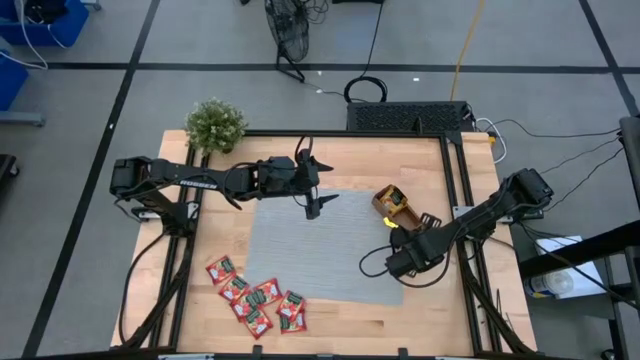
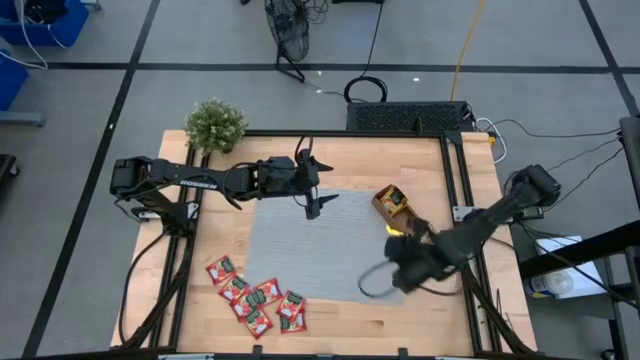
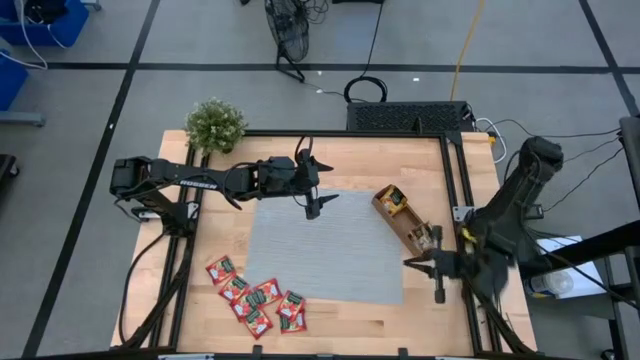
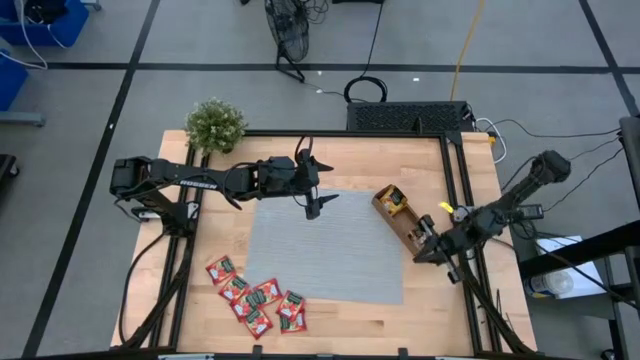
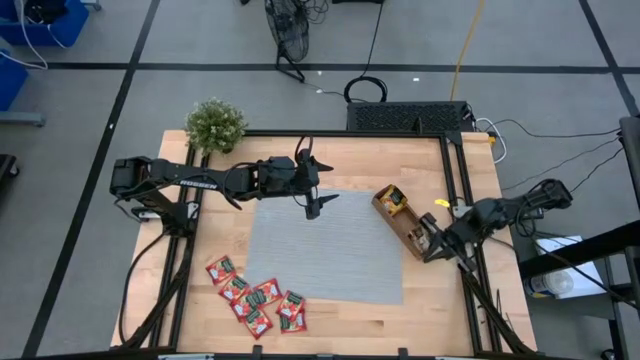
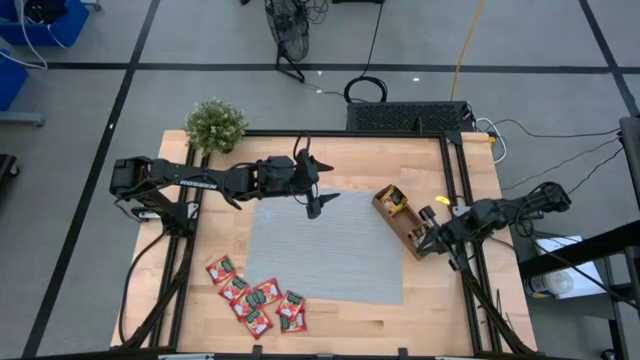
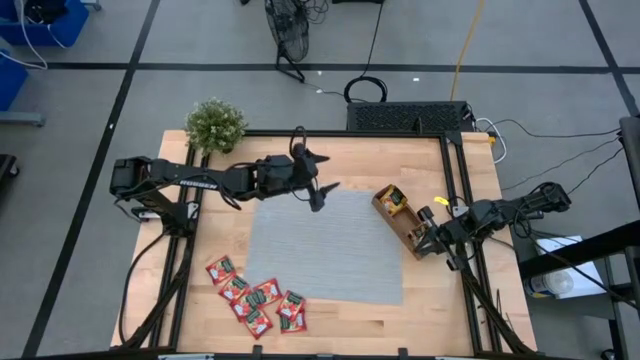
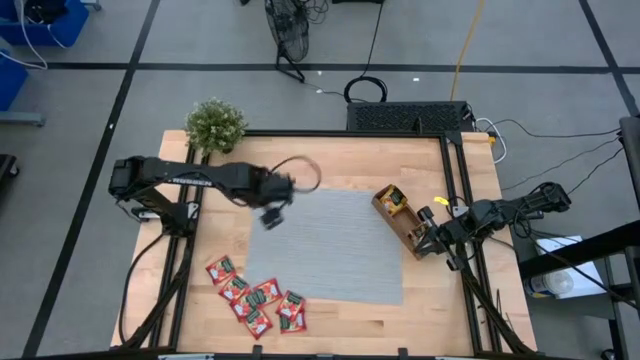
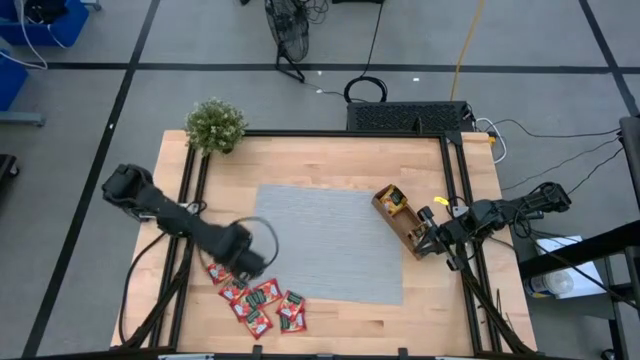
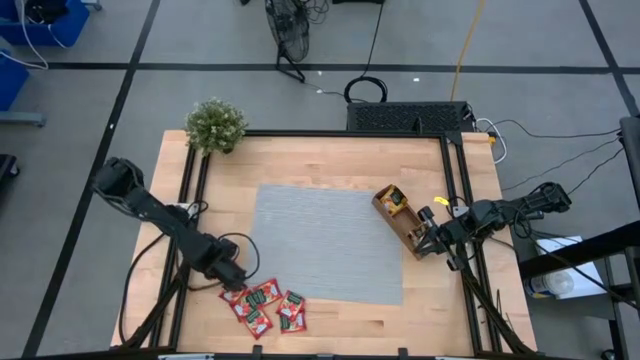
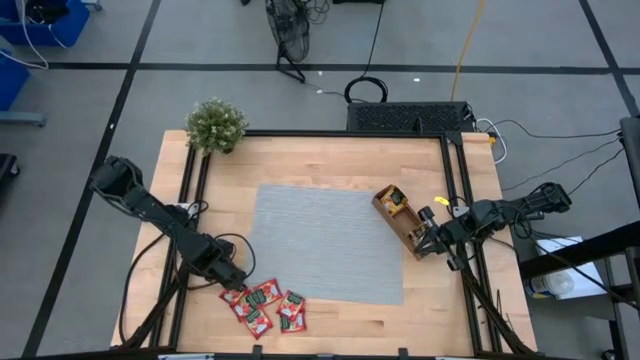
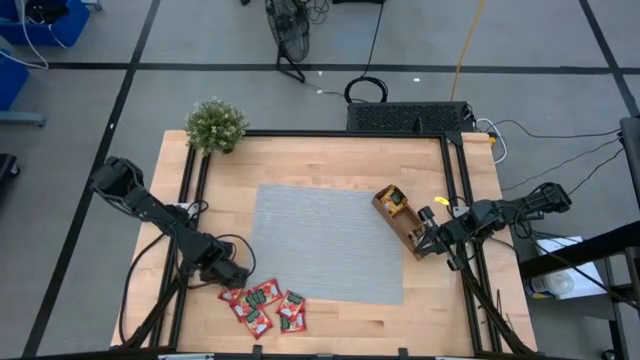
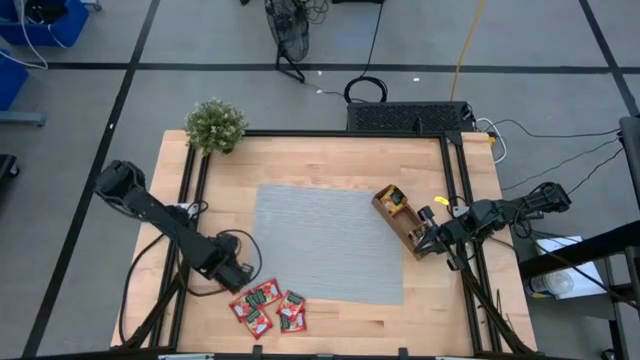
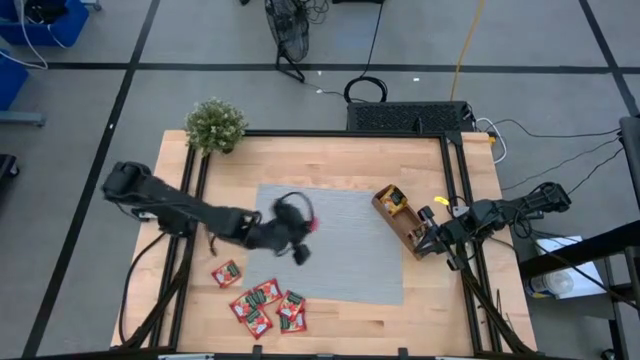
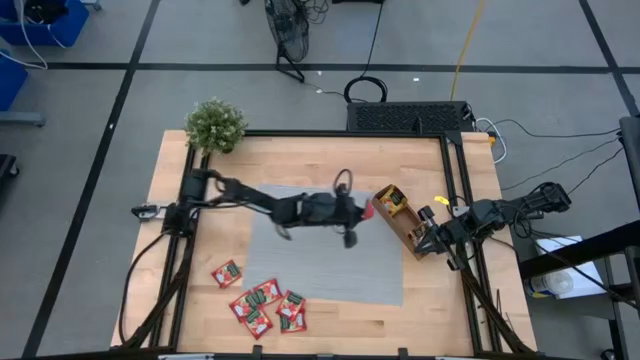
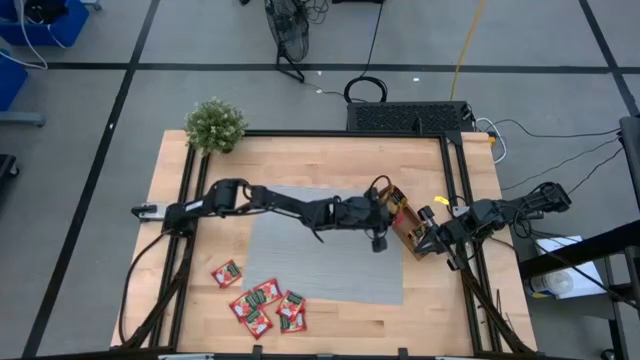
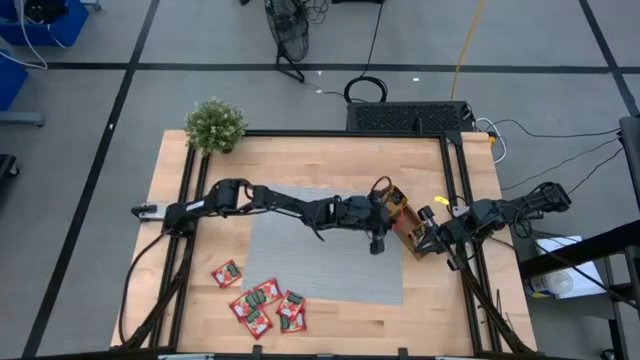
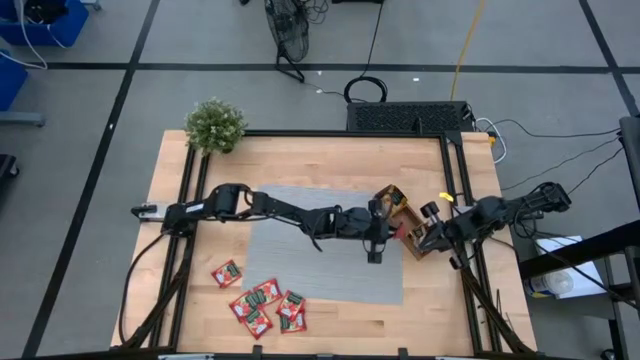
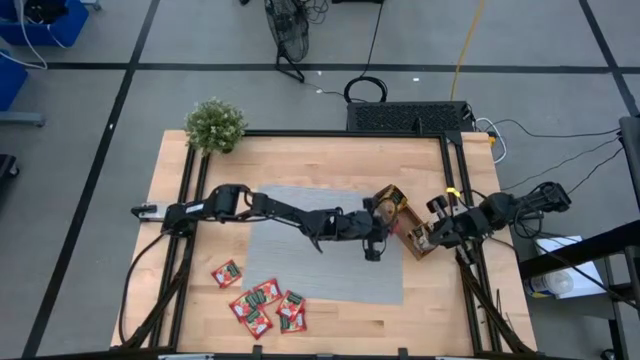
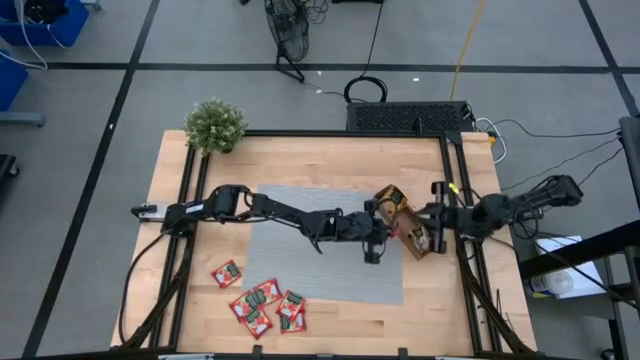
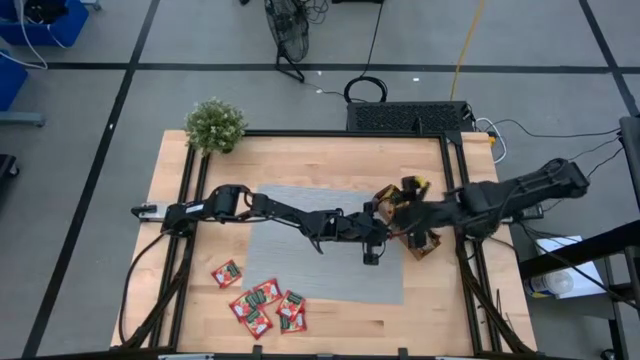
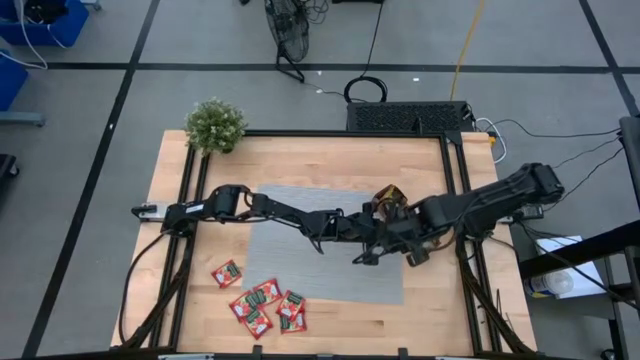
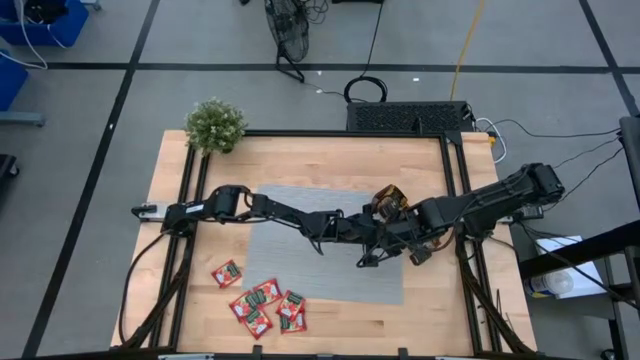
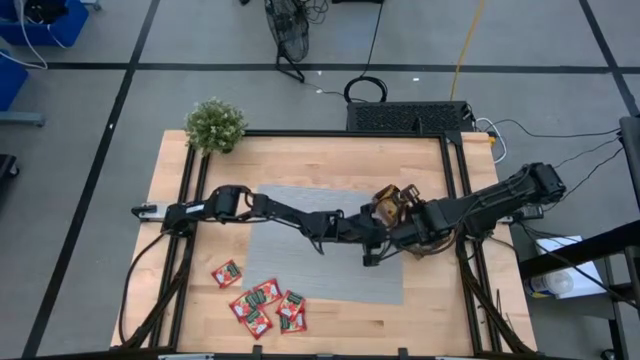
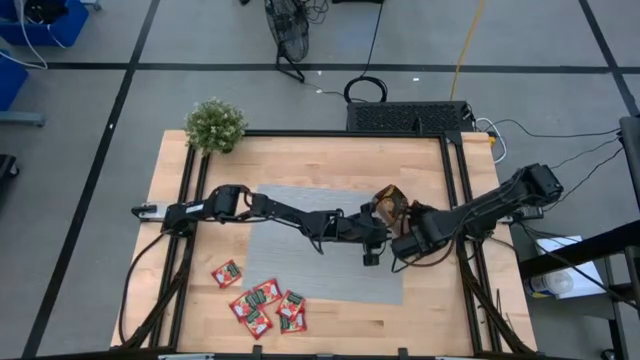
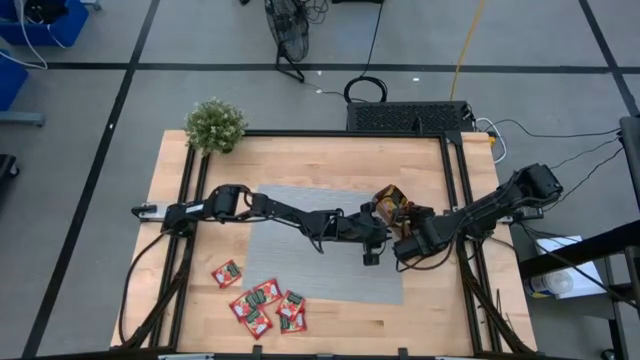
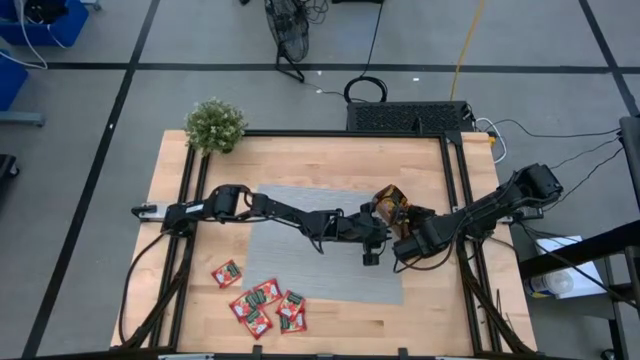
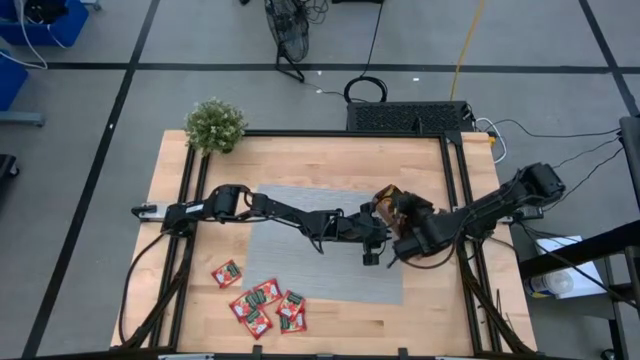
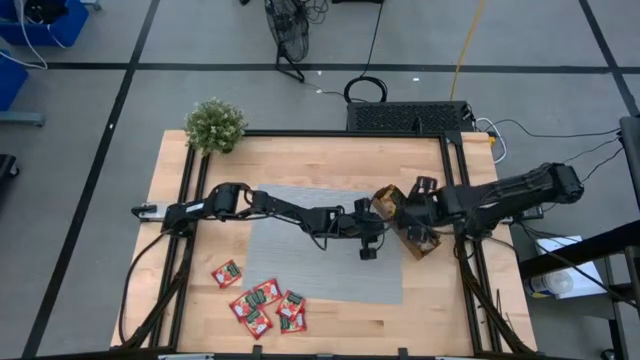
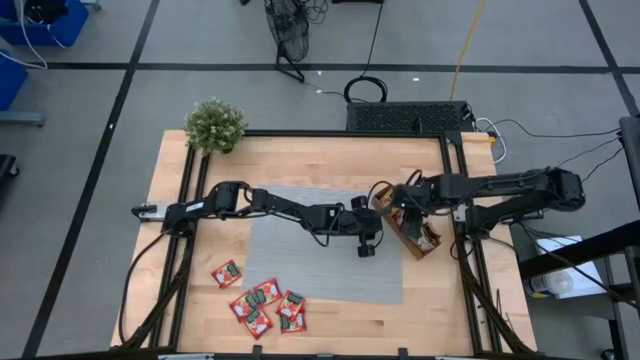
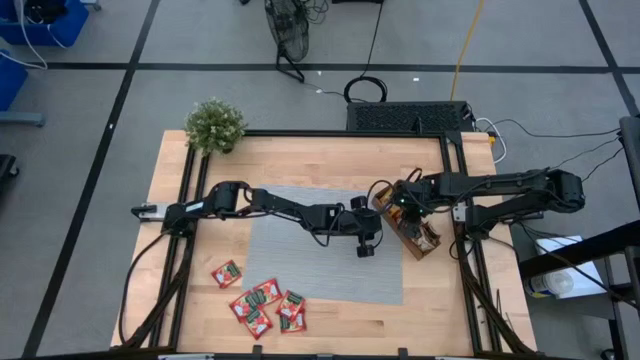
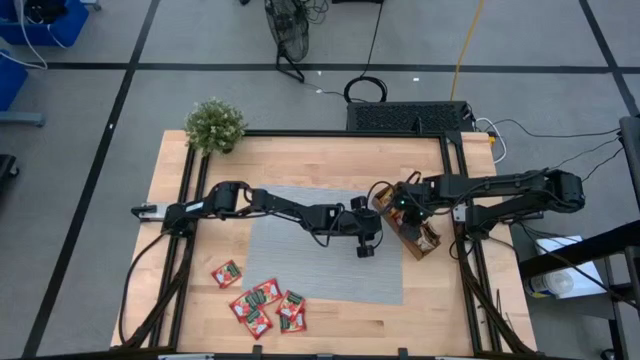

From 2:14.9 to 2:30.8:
Task: Pick & Place Tea
Put the red tea bag into the middle section of the wooden organizer

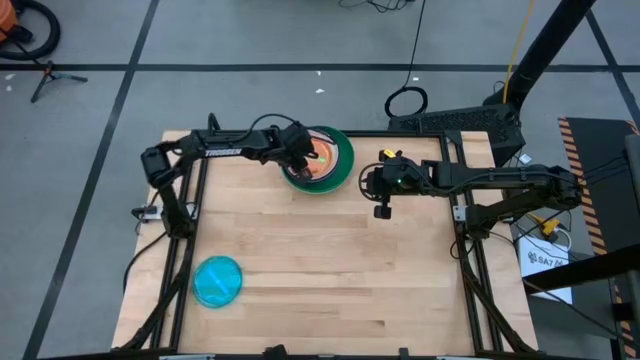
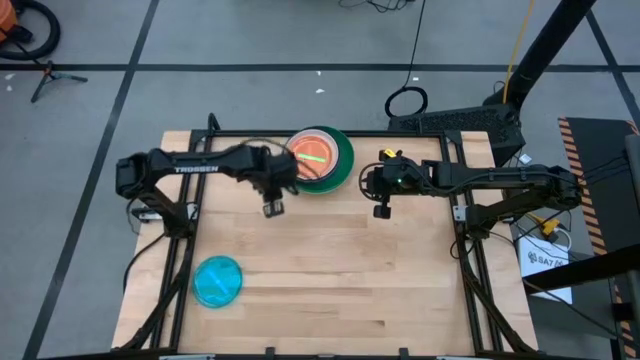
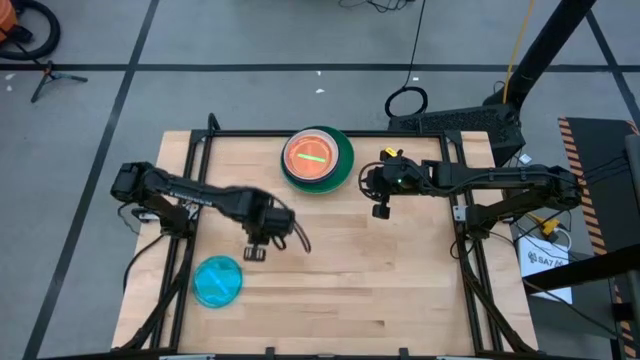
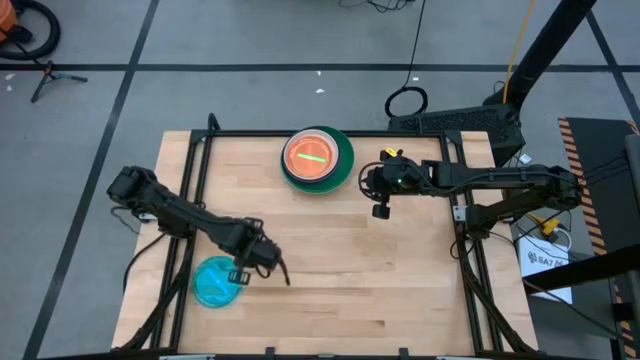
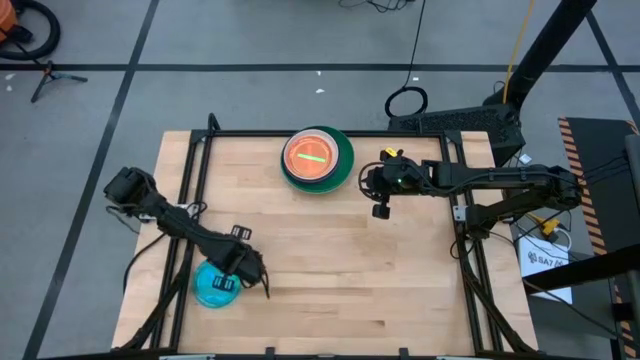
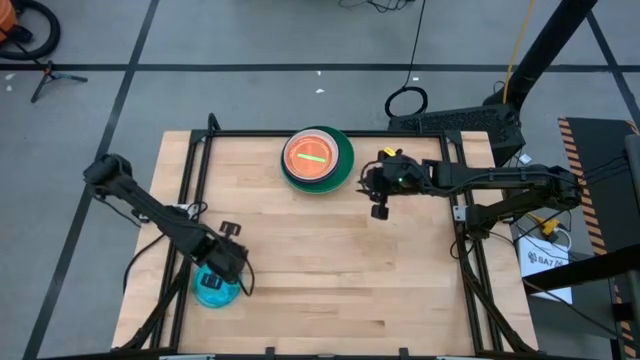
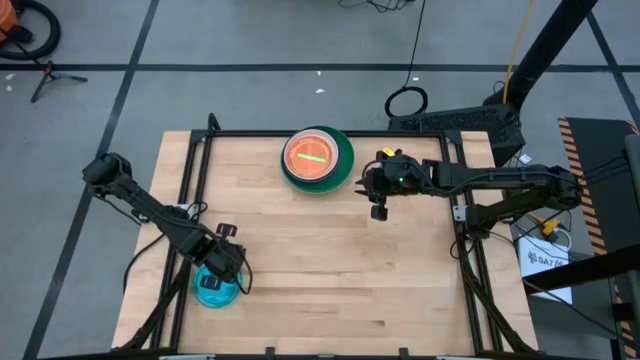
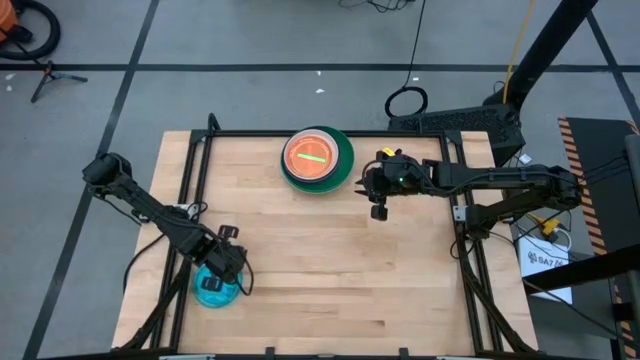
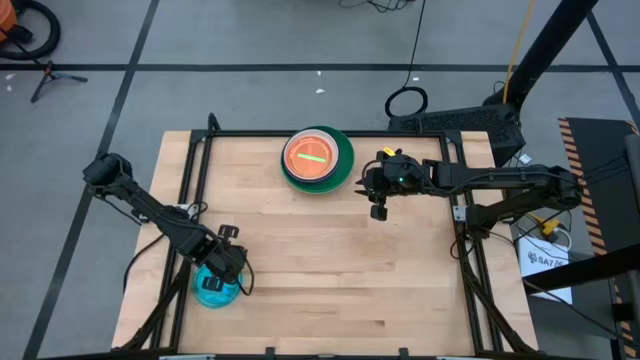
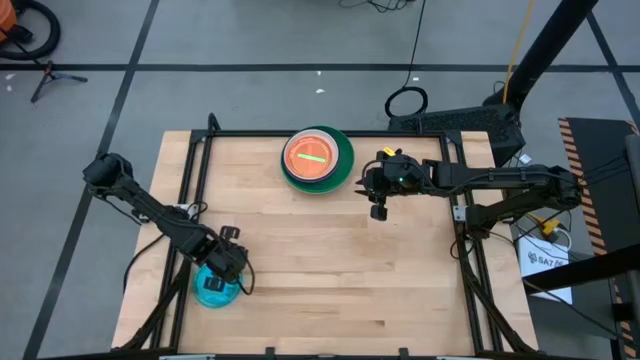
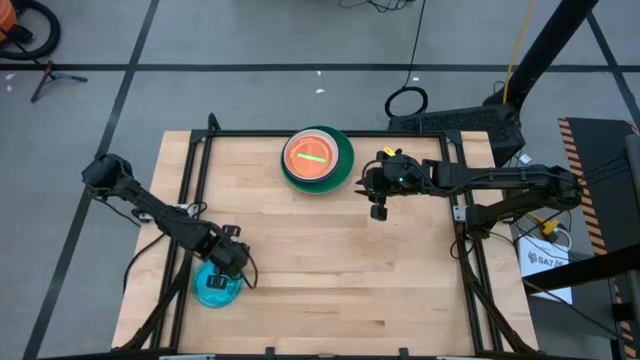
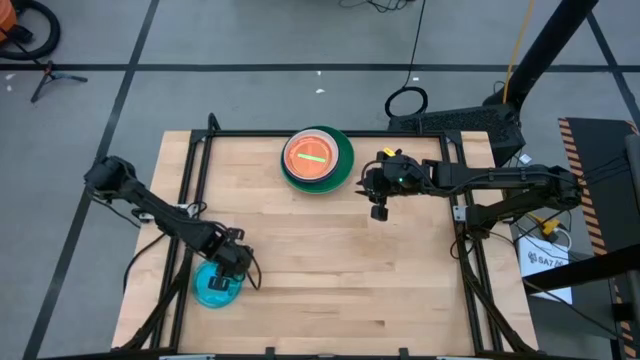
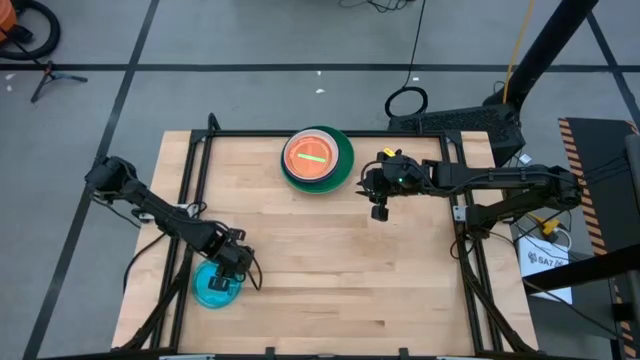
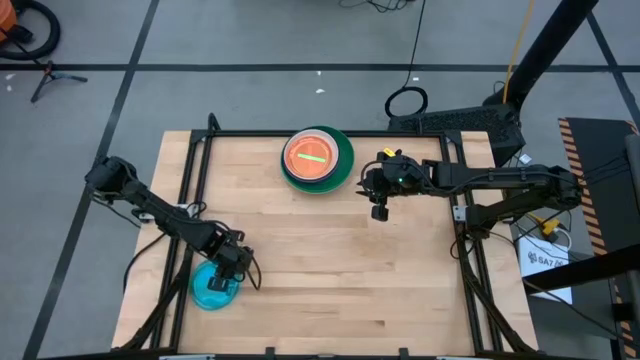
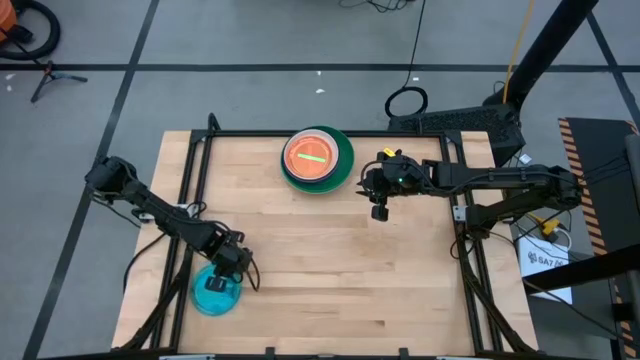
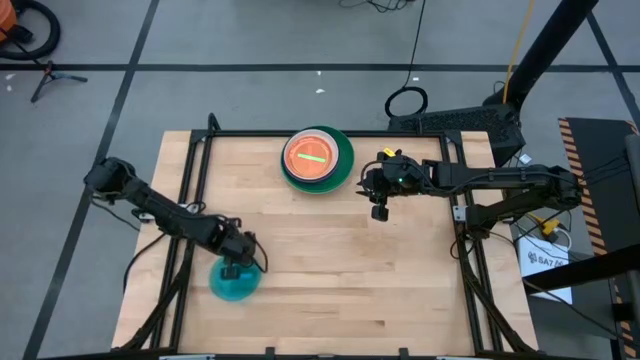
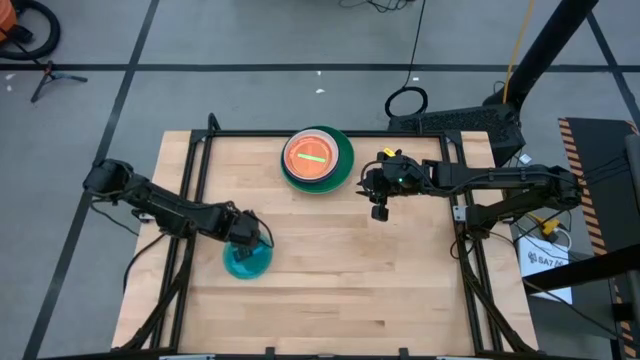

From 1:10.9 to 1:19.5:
Task: Stack plastic plates
Stack the light blue plate on top of the light green plate
